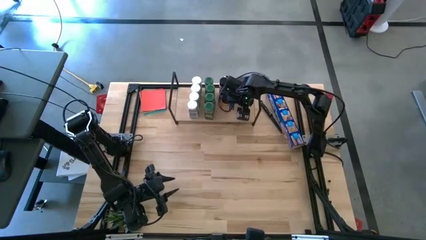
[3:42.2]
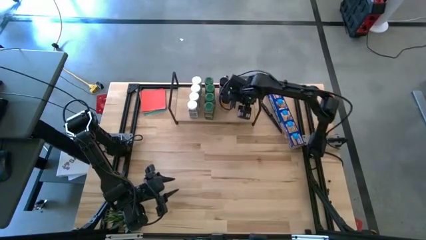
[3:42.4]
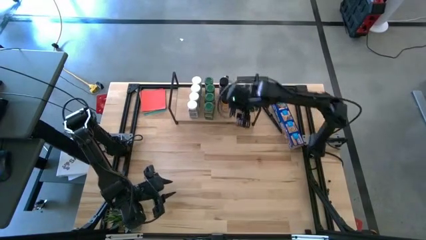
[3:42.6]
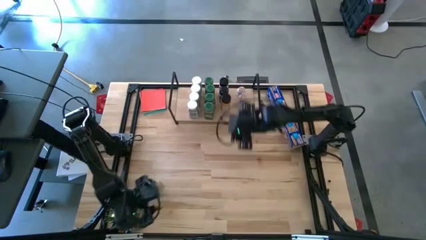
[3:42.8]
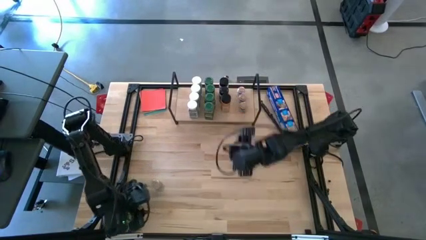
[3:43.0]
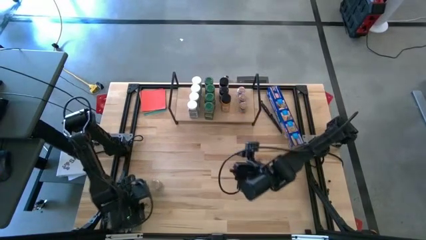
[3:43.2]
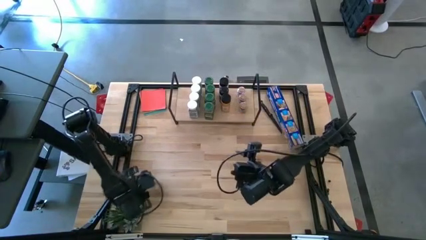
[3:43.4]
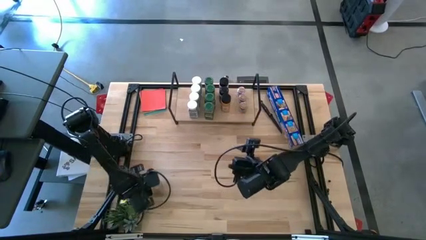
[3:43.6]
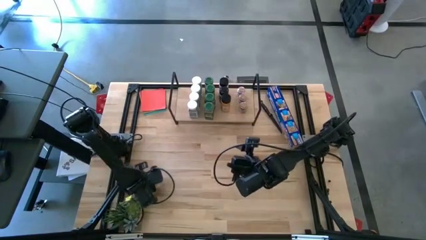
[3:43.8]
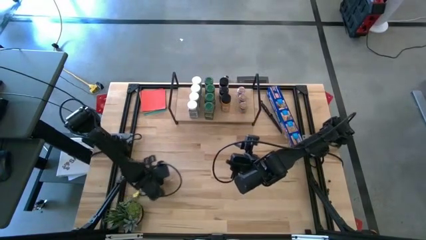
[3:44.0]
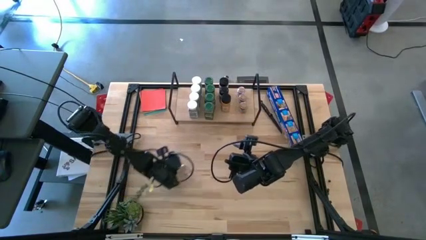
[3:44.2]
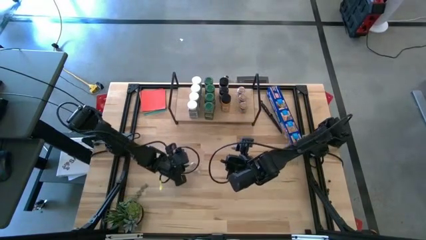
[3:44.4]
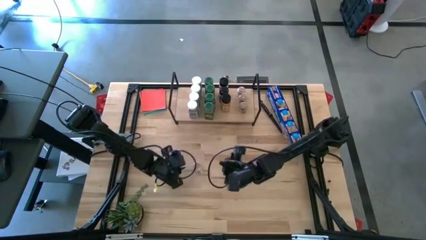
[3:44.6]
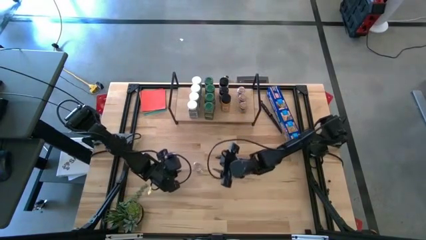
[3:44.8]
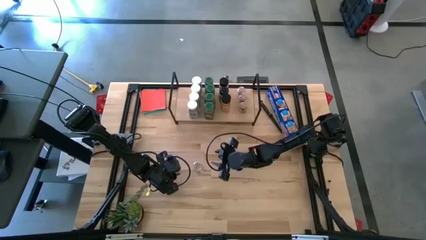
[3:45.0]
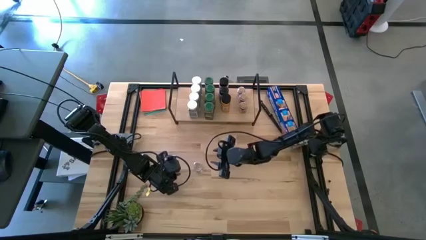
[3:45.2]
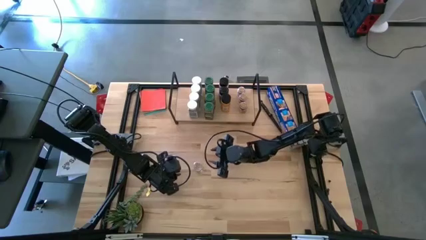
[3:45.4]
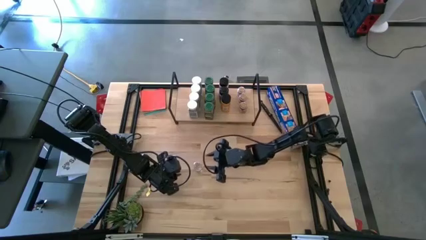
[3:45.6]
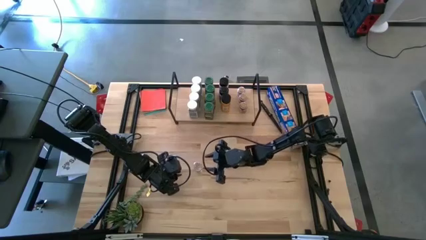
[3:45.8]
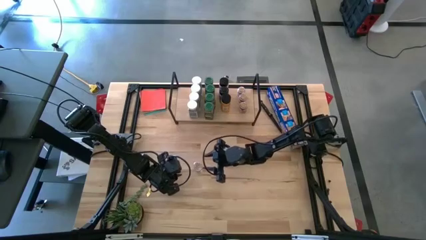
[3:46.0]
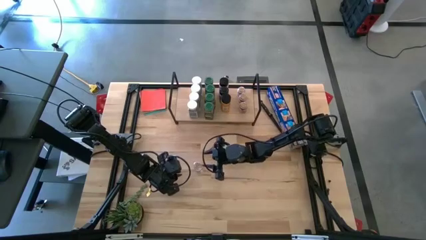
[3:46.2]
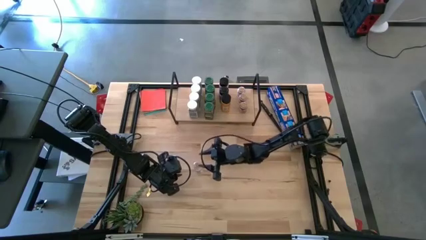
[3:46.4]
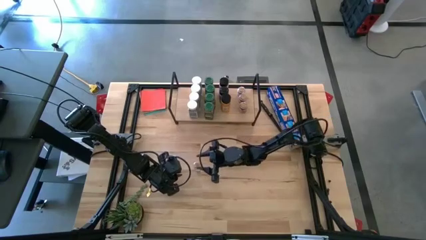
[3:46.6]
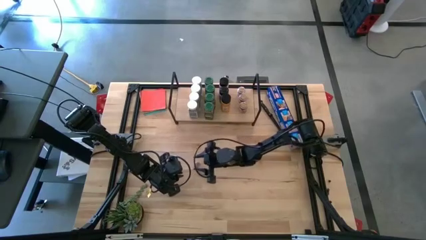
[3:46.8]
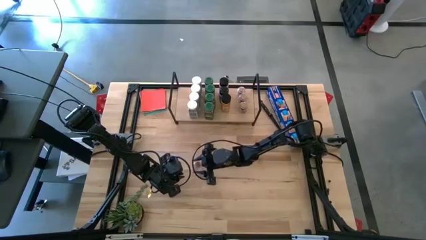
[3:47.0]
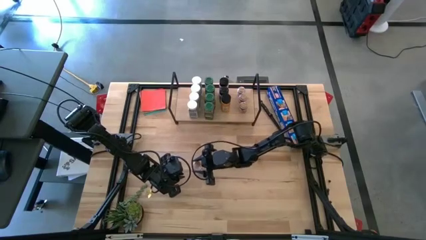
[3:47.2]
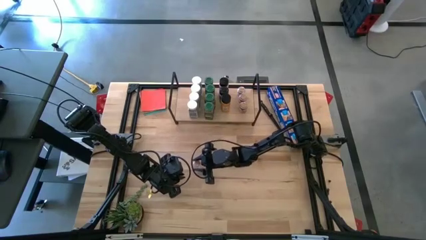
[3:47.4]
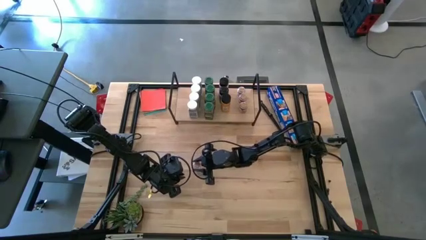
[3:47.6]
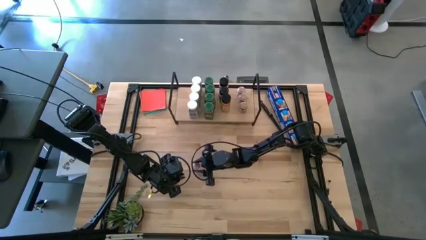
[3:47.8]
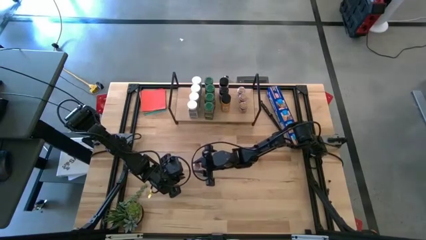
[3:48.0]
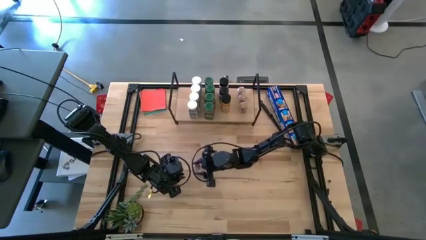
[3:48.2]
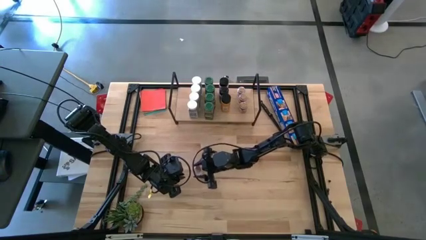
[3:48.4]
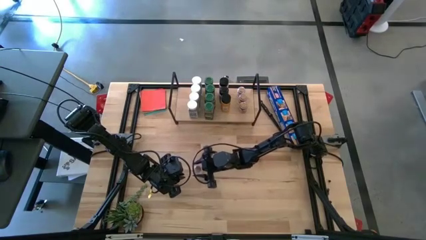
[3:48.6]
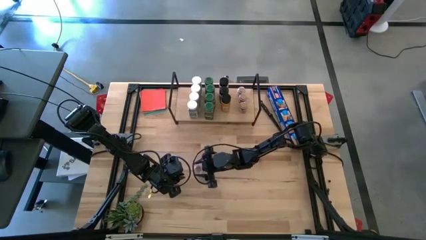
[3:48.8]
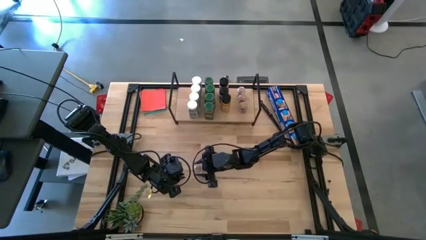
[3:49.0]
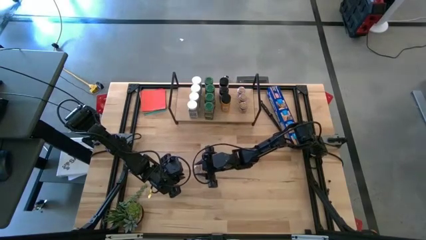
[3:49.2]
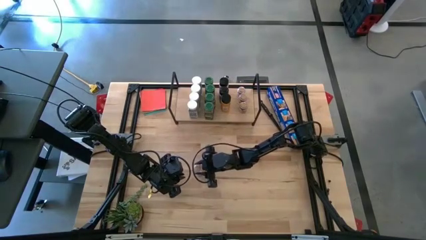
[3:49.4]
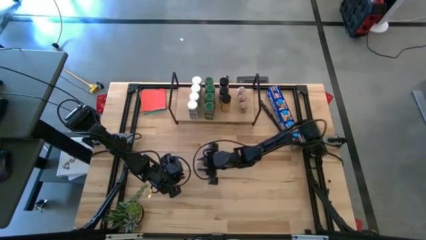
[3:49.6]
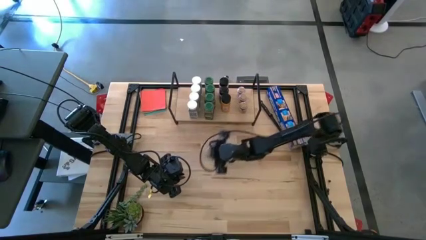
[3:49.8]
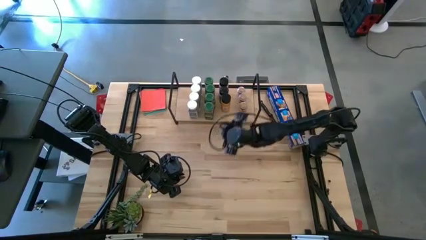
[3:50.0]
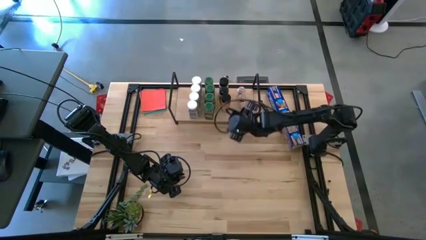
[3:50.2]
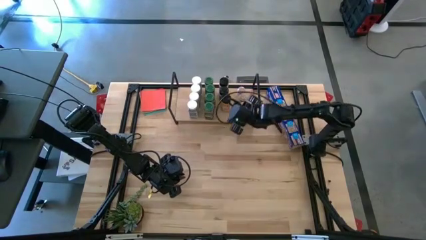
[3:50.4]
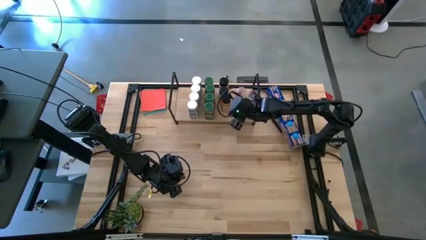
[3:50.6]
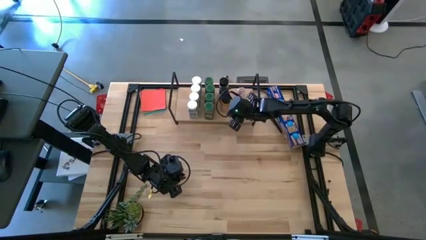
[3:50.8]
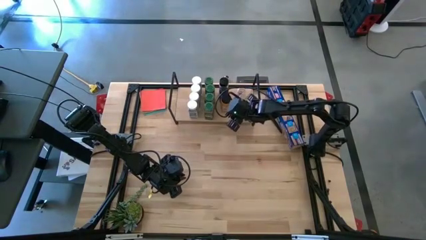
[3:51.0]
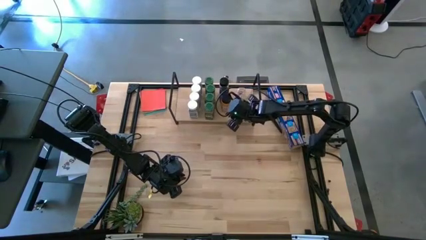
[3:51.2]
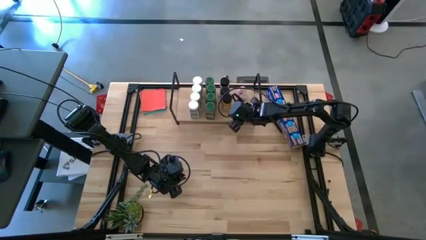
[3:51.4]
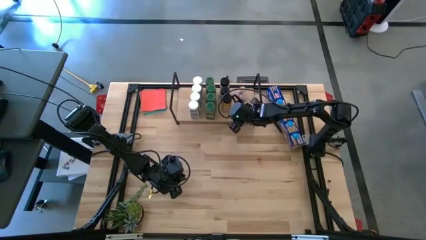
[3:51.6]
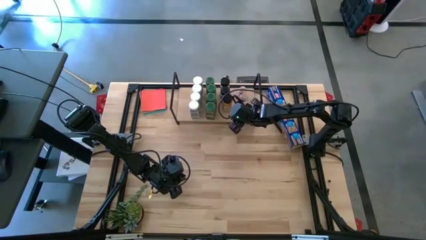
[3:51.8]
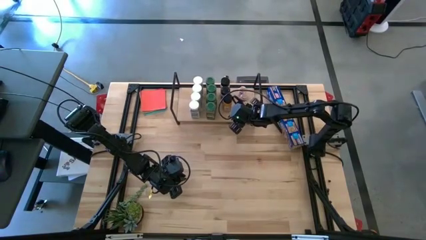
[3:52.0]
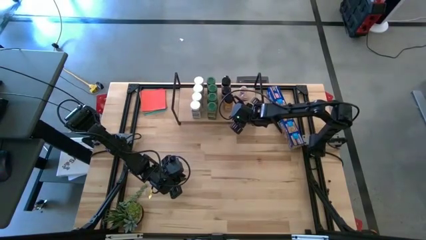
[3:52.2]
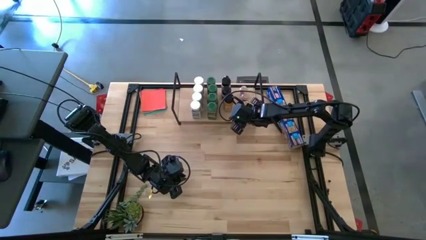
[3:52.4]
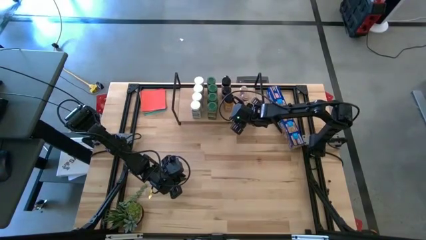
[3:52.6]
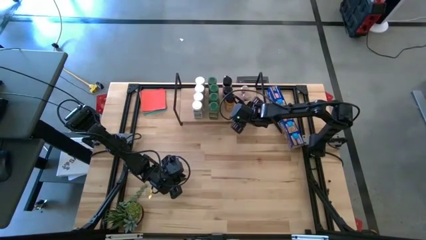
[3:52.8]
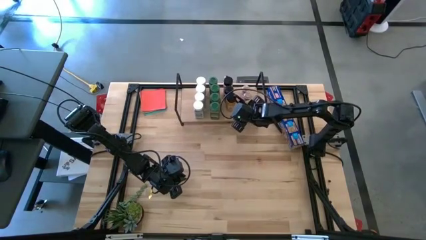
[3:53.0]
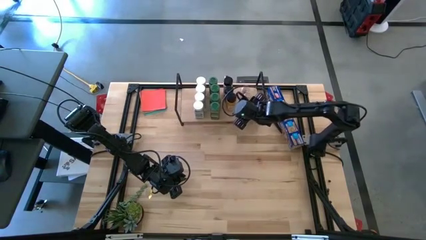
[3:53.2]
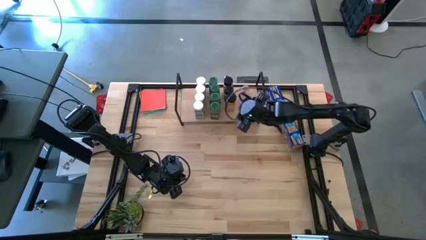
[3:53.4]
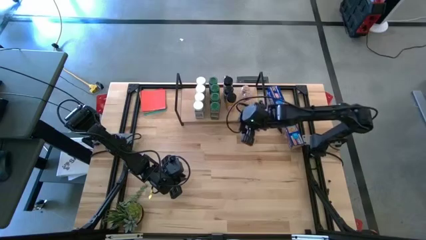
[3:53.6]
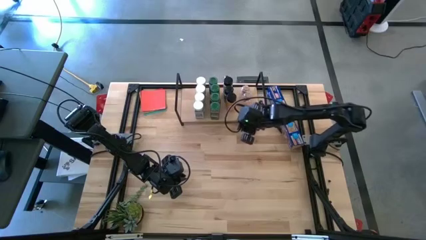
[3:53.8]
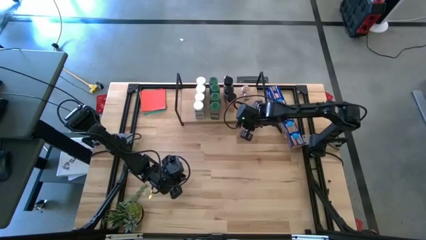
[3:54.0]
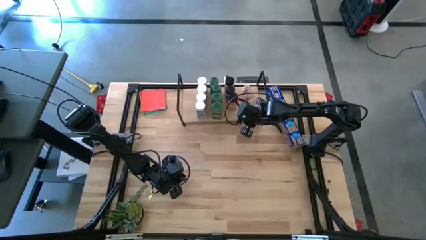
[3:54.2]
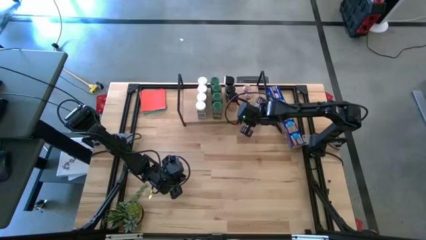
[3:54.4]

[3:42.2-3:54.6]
Task: Shelf spices
Put the brown seasoning bottle on the shelf

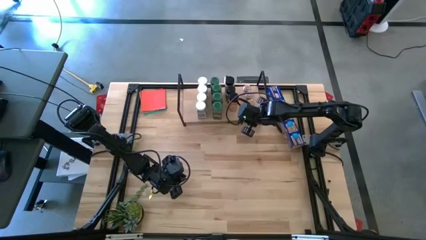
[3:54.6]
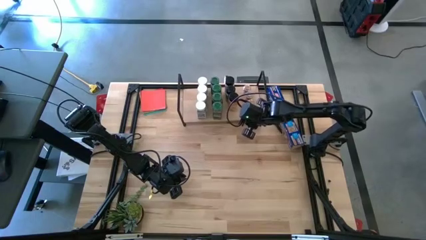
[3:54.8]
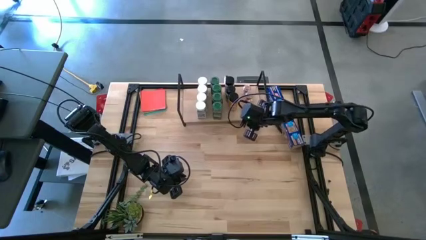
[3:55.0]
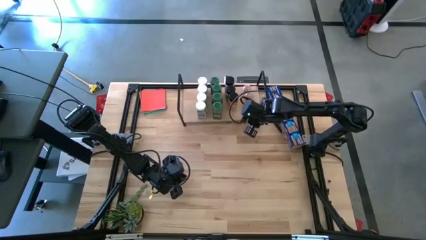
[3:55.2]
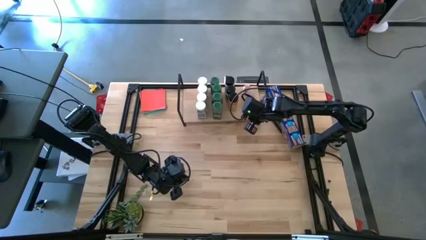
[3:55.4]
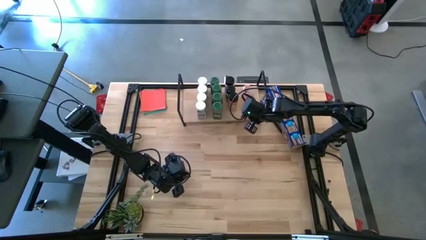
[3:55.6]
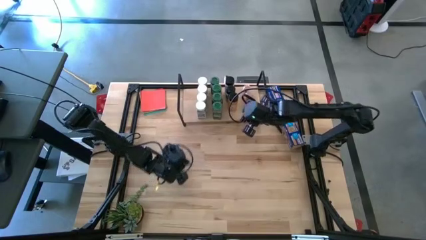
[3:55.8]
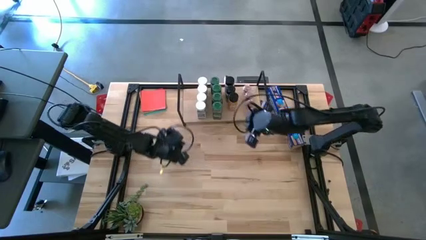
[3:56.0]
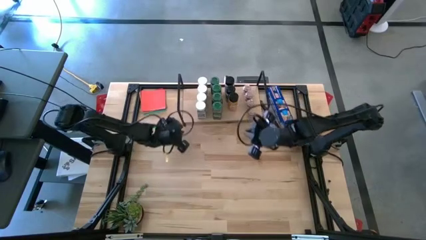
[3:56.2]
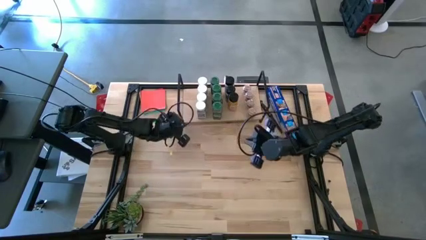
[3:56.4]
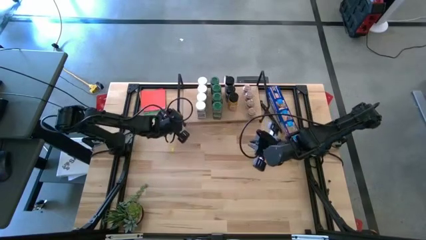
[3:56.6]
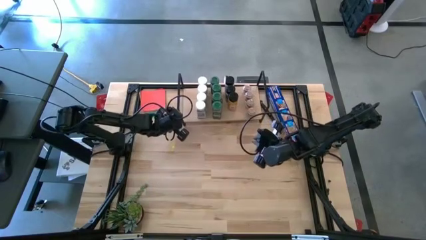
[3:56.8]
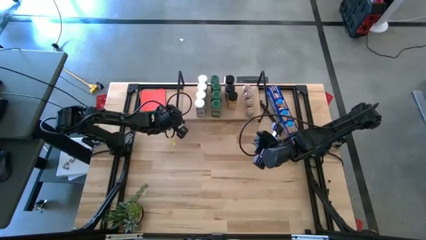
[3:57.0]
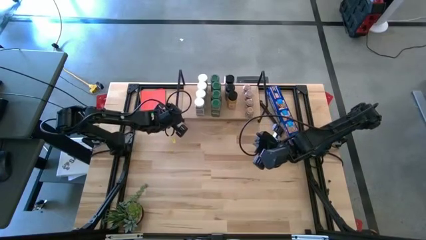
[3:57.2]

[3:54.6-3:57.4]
Adjust the shelf
